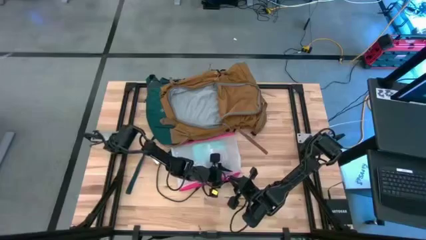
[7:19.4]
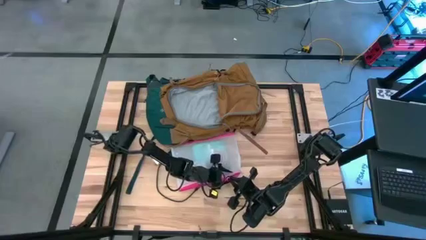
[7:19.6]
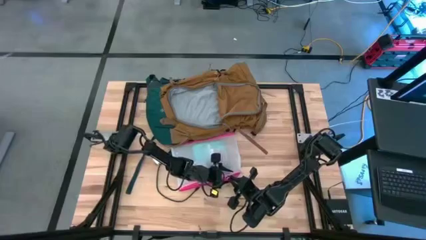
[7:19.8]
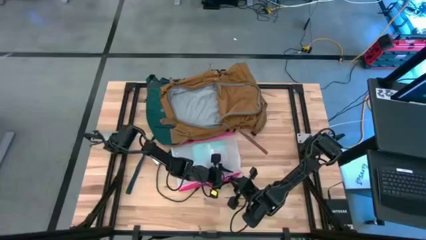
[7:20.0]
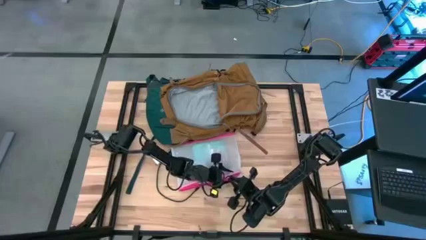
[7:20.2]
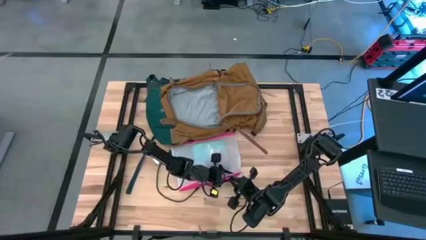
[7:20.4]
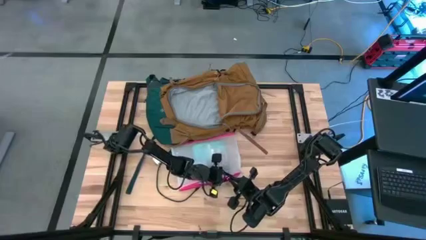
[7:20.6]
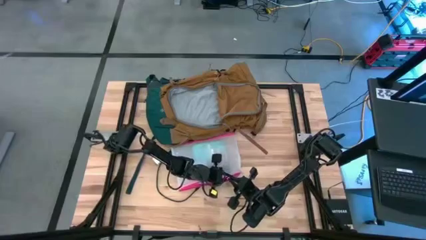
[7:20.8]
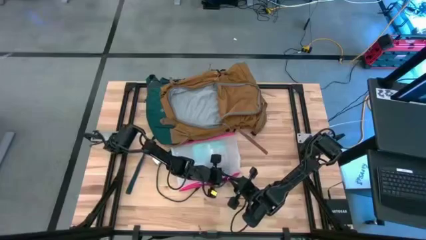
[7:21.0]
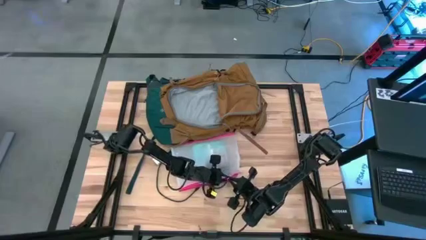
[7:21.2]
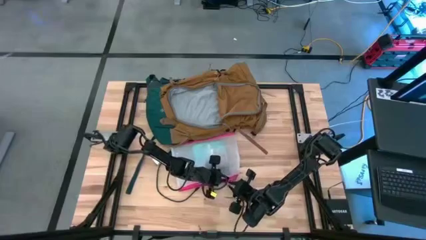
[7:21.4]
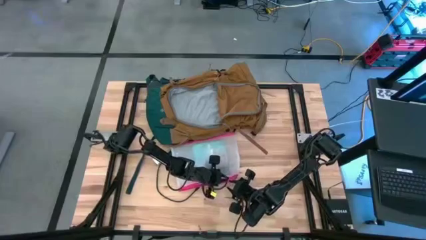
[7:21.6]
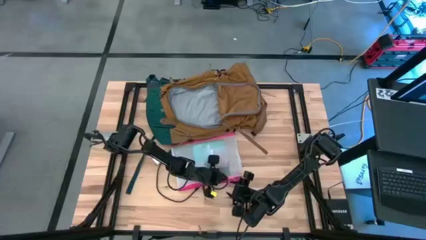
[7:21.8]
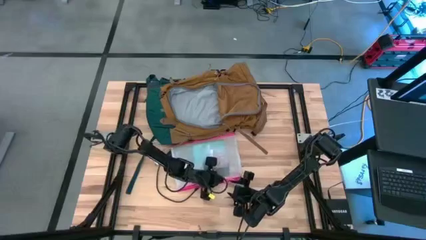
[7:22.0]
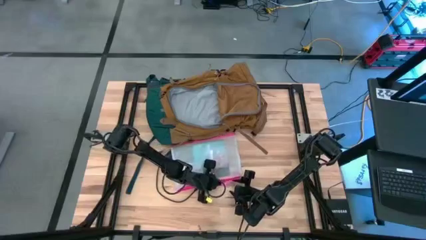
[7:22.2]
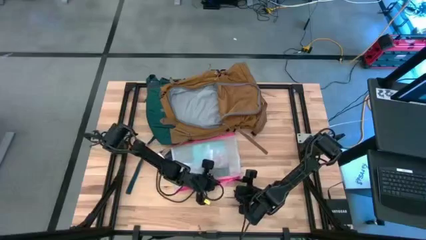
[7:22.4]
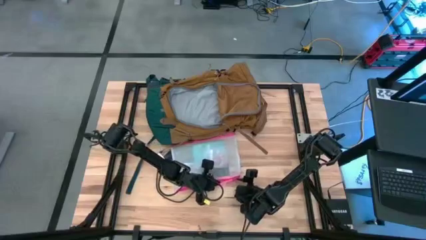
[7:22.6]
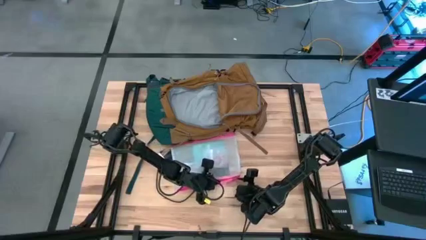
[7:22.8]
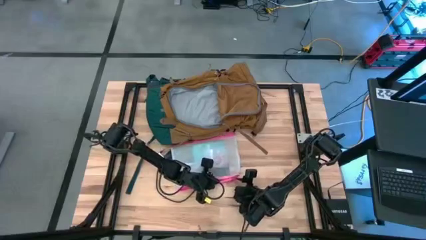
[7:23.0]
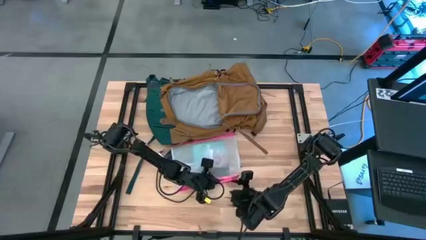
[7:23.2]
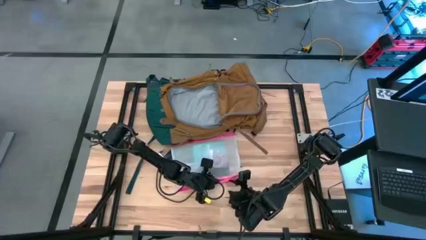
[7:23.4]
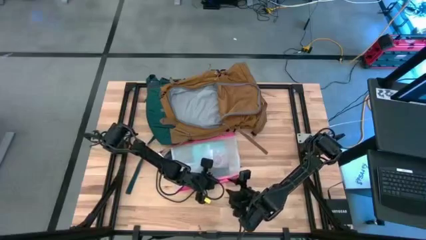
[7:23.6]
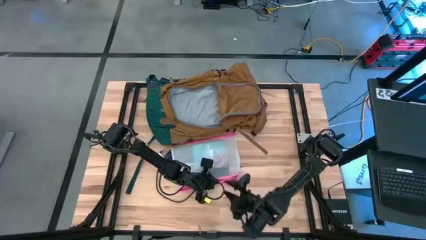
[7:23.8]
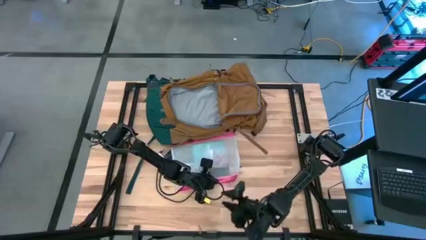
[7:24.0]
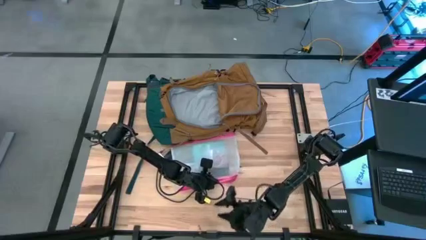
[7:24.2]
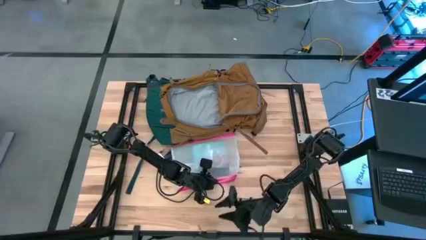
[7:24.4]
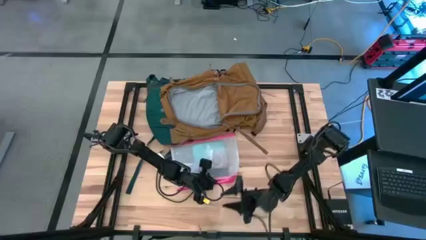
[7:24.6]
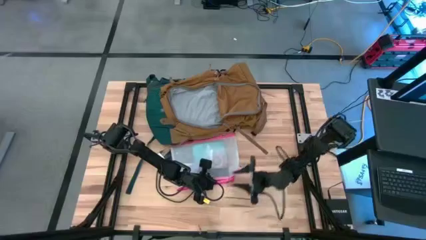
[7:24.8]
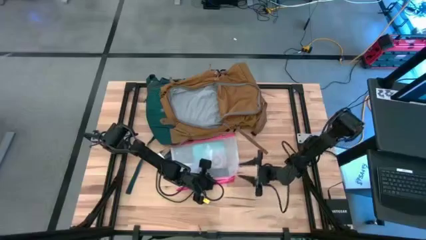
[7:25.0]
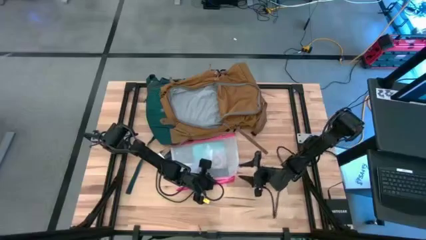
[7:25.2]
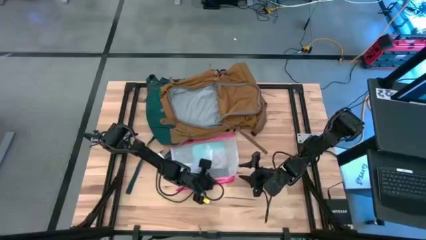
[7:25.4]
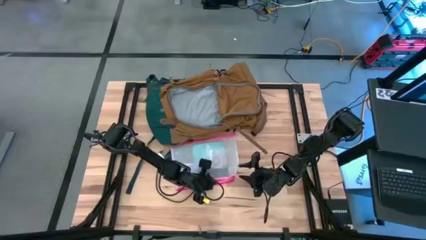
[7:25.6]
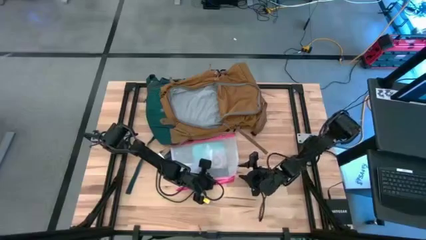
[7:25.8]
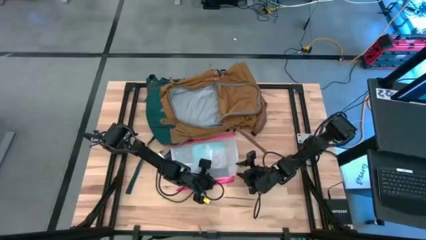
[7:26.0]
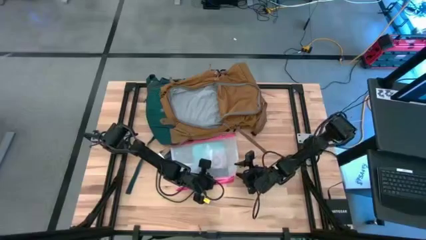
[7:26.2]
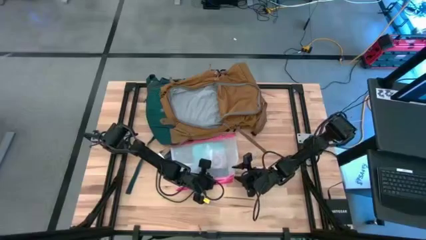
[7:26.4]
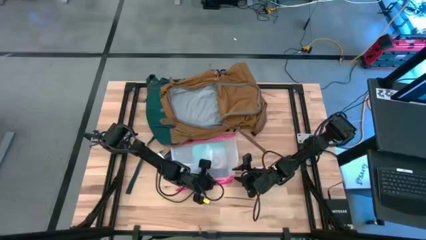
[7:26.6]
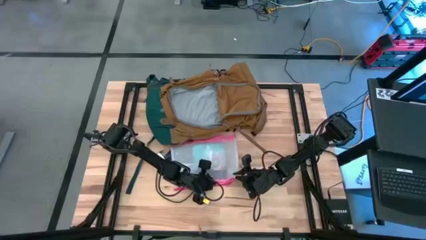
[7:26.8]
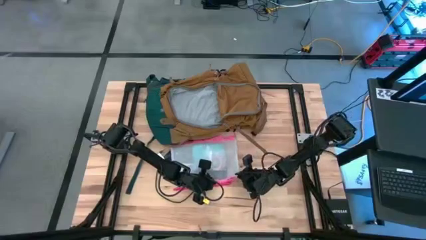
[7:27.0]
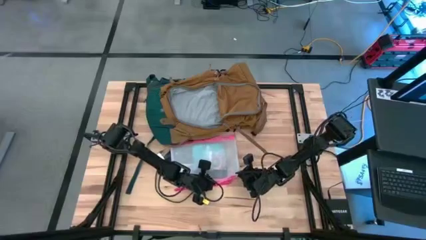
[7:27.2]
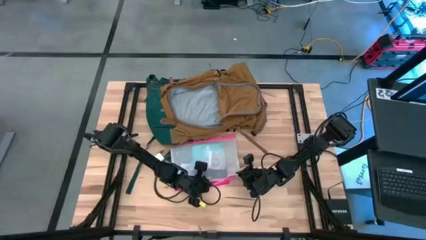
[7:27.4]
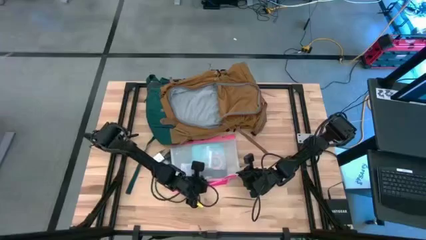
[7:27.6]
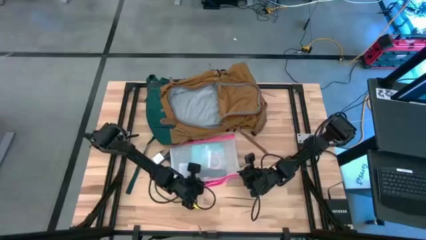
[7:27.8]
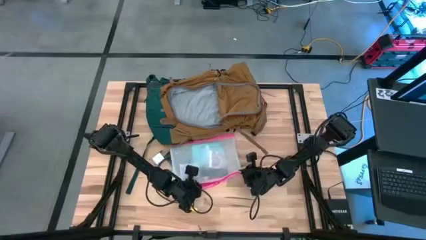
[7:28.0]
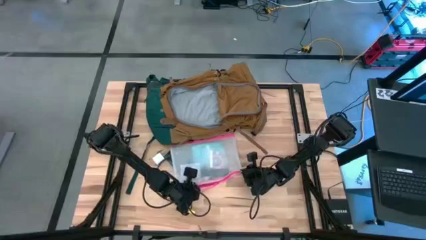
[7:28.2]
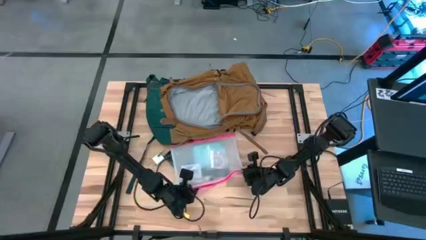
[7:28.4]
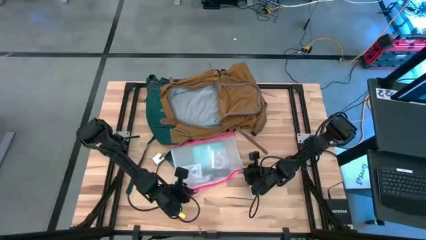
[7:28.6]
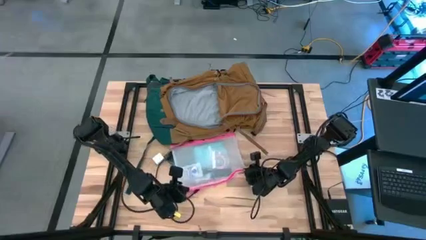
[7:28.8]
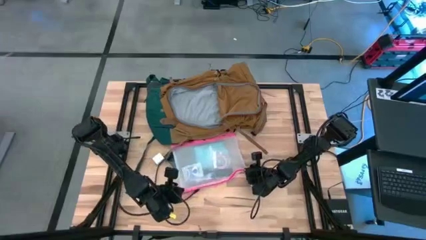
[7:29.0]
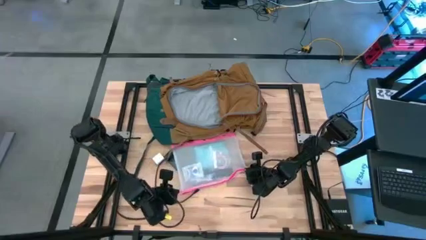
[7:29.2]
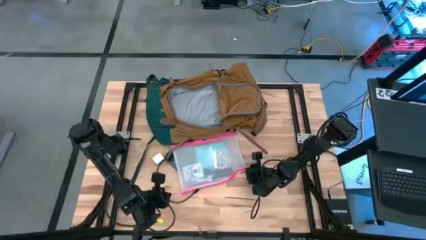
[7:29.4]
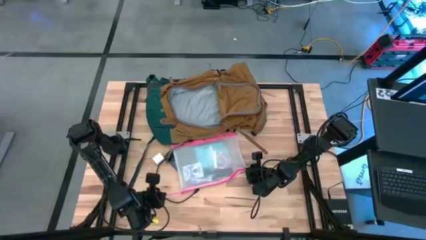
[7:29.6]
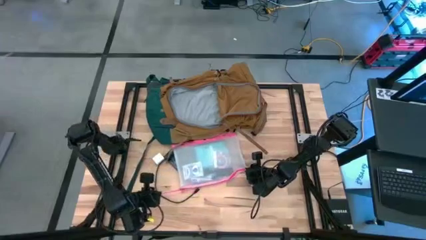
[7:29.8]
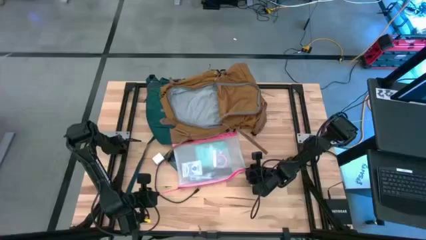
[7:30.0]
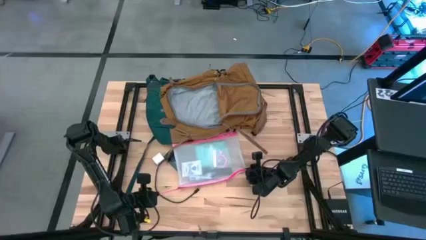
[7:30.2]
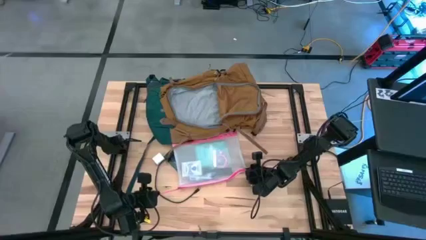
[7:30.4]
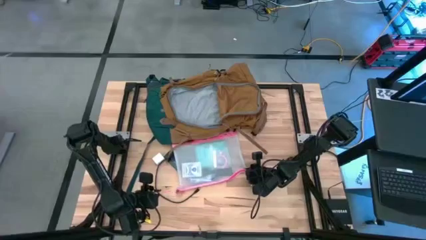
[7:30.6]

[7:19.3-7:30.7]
Task: Unpack backpack
Close the pink zipper pouch

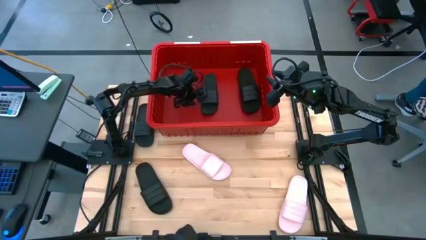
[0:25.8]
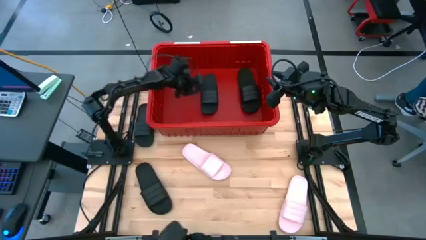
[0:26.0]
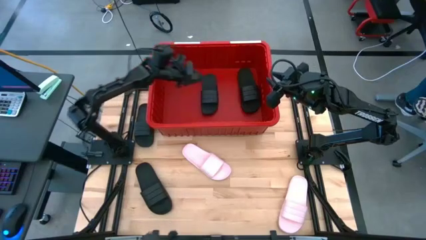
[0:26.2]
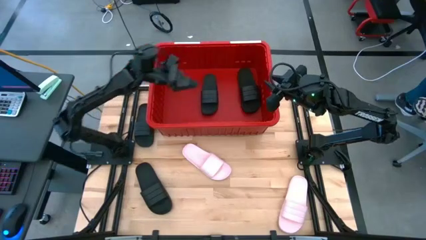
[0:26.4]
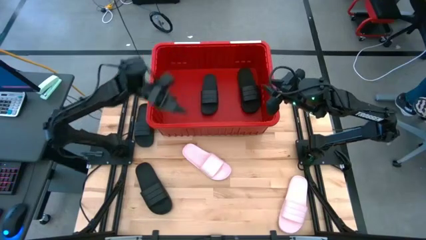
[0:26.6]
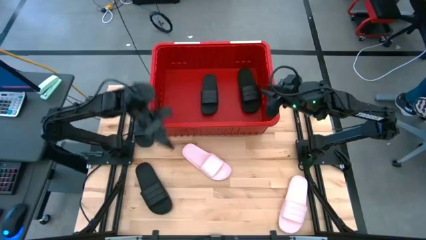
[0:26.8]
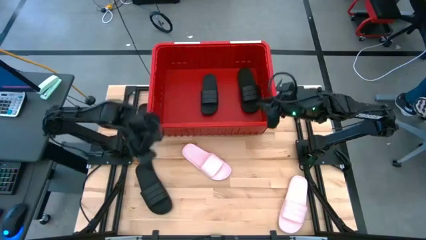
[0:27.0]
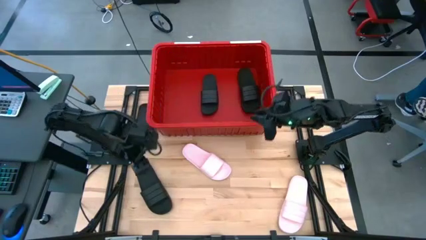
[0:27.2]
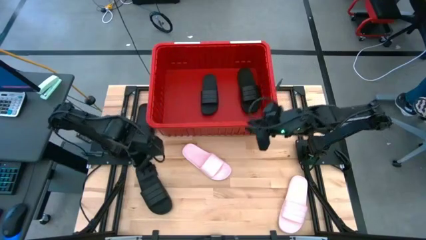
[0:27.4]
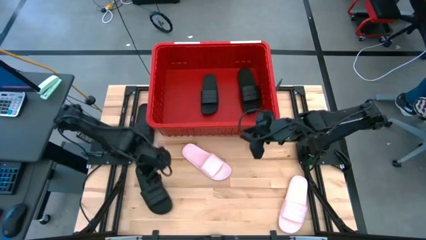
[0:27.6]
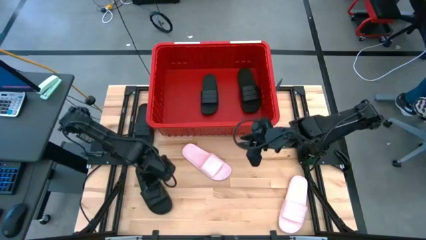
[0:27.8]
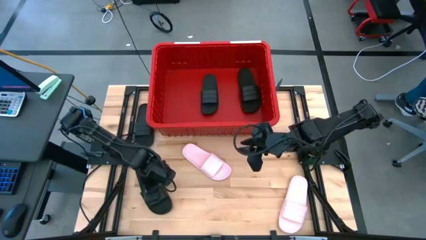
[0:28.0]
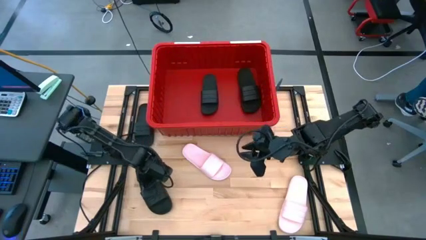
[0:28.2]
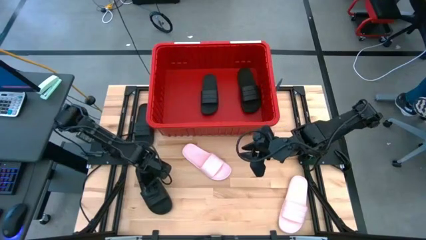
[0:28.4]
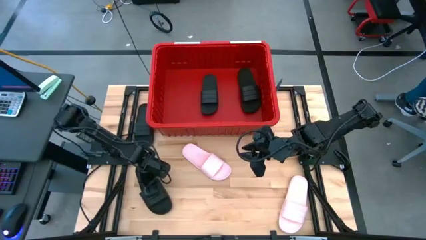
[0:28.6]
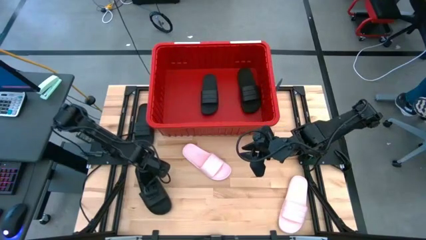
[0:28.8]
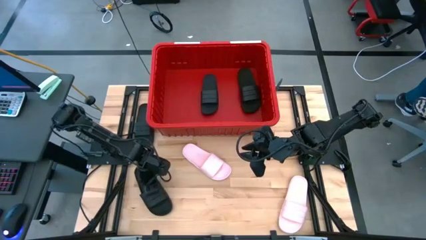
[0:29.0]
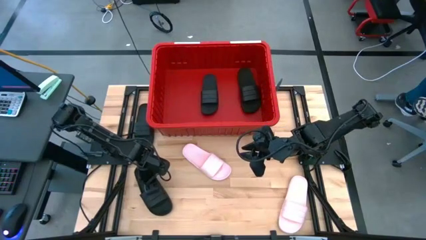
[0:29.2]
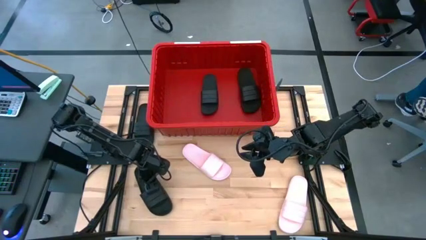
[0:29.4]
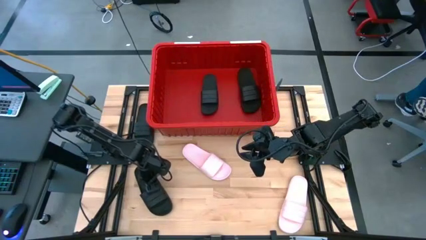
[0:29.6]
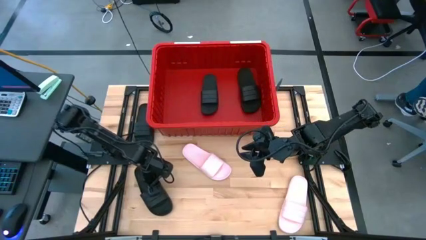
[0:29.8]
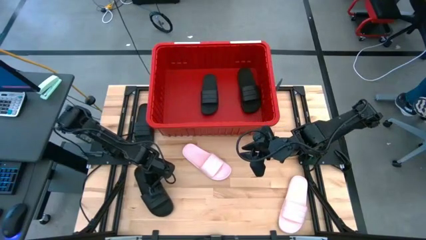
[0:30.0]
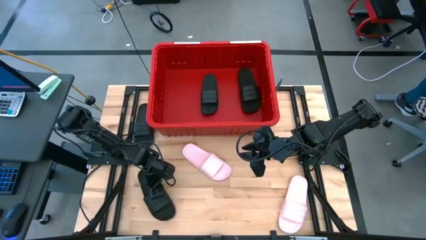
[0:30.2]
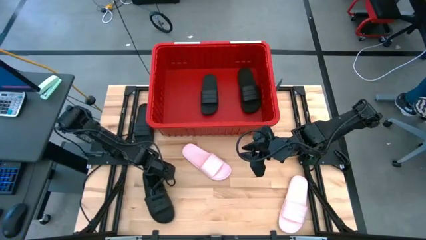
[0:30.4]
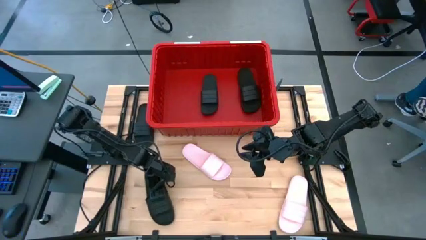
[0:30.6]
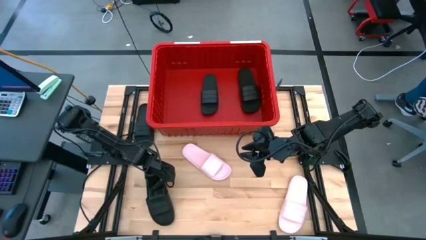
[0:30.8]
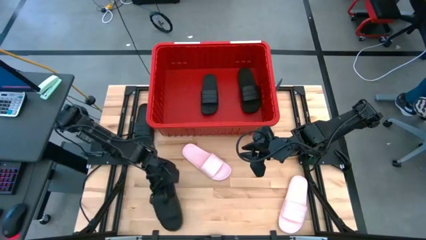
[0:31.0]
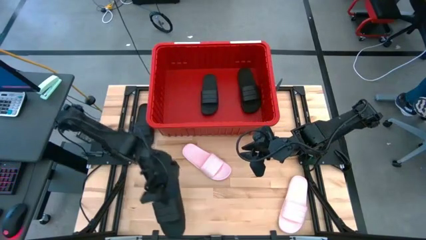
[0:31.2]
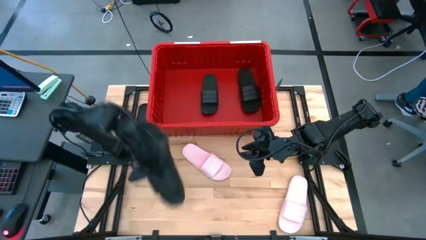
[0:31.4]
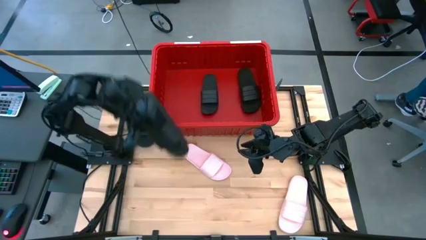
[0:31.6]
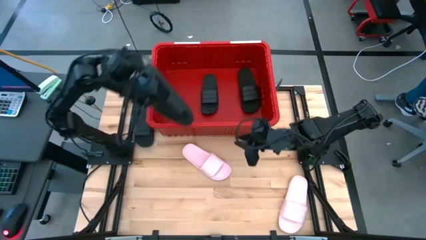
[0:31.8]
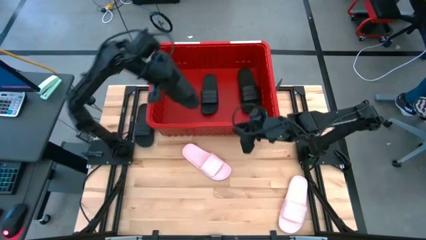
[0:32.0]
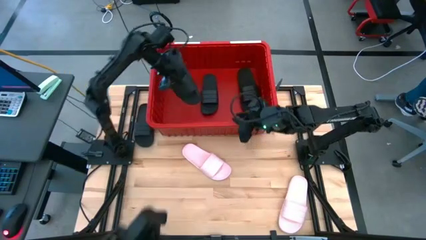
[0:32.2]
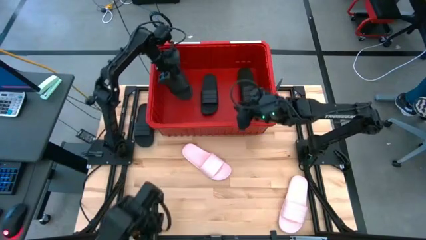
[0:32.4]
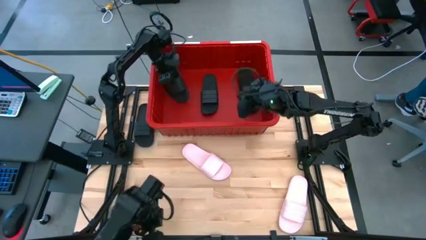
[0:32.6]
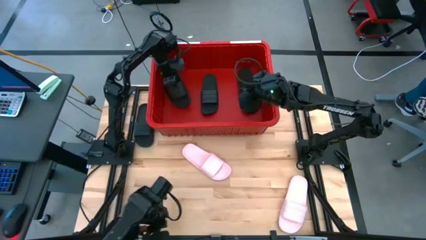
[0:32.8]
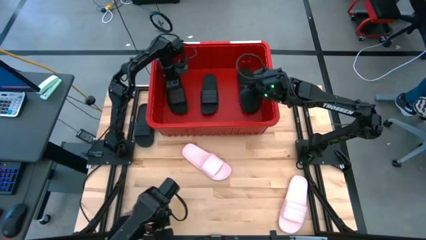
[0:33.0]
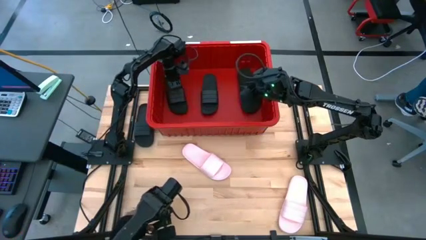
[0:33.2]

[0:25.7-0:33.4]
Task: Pick and place slides into bin
Put the black slide into the red bin
